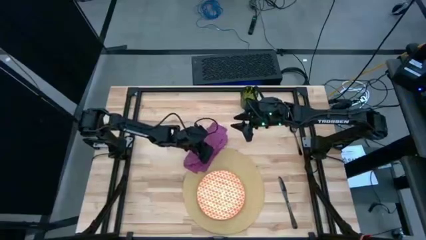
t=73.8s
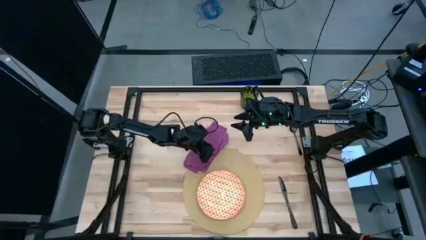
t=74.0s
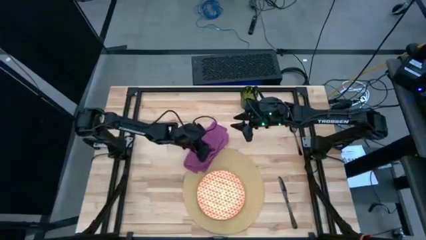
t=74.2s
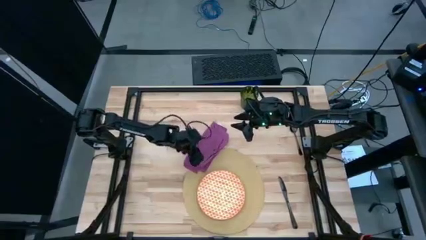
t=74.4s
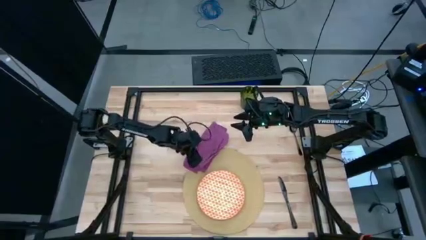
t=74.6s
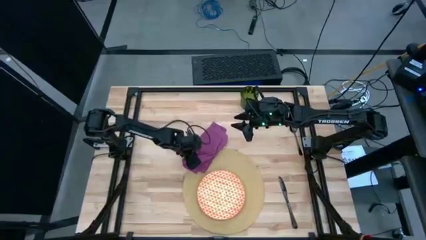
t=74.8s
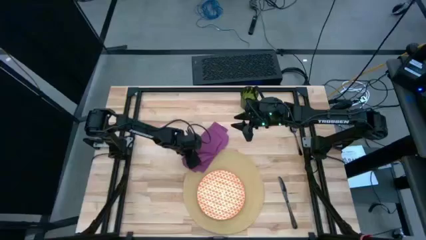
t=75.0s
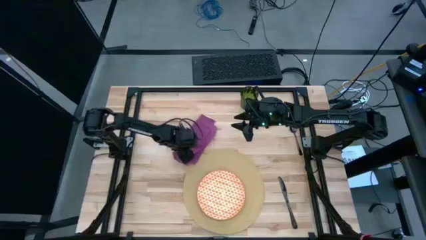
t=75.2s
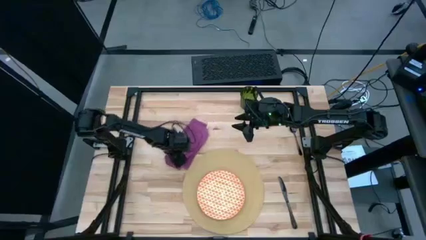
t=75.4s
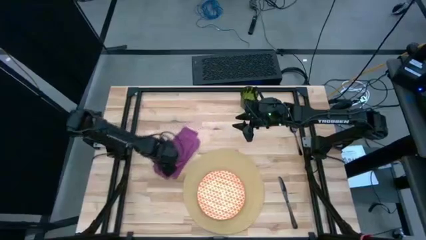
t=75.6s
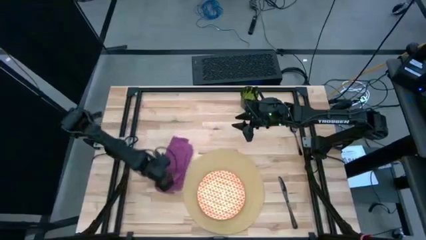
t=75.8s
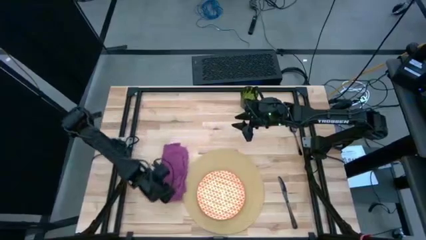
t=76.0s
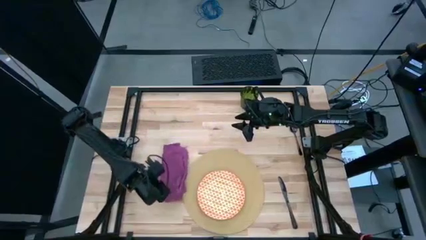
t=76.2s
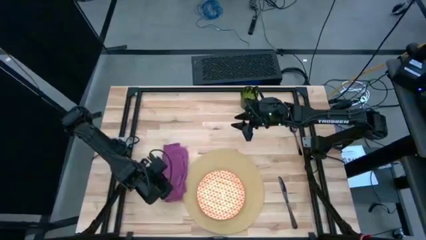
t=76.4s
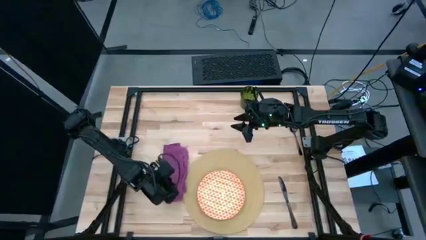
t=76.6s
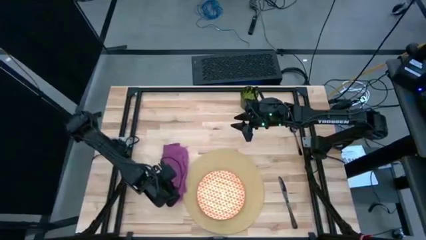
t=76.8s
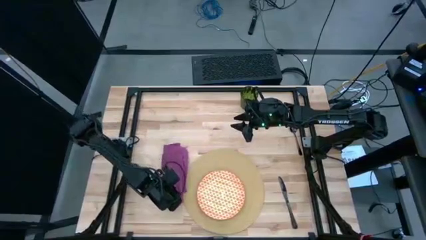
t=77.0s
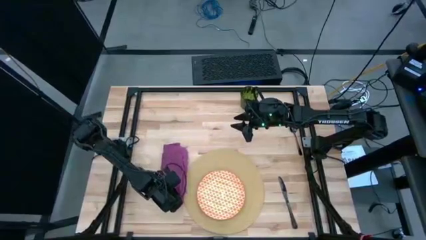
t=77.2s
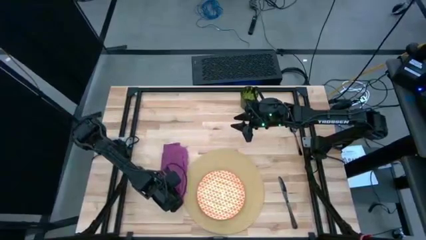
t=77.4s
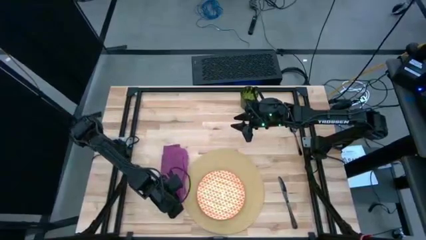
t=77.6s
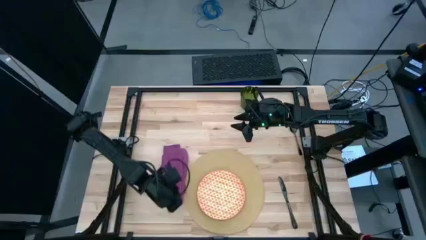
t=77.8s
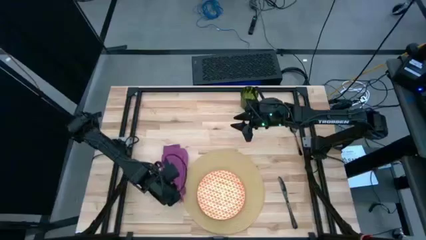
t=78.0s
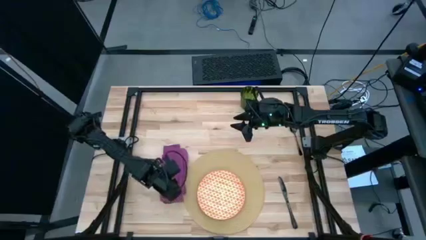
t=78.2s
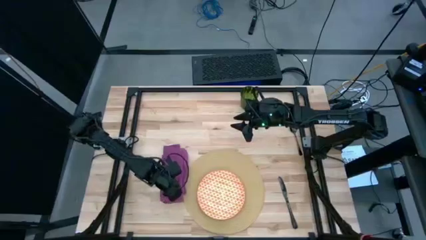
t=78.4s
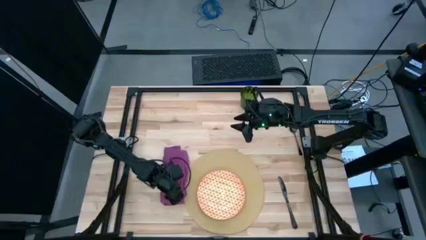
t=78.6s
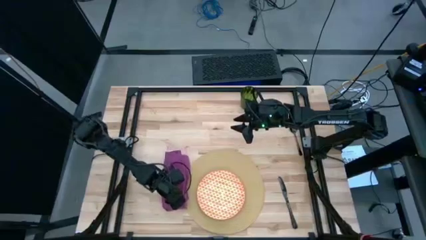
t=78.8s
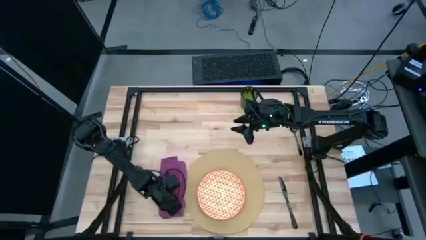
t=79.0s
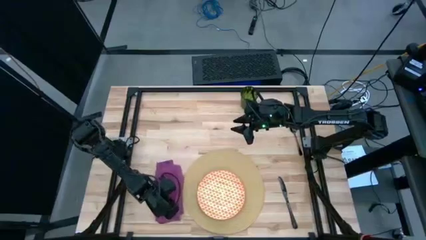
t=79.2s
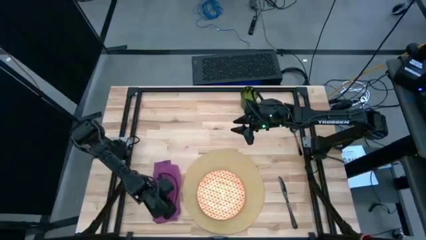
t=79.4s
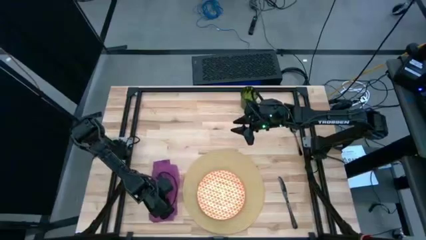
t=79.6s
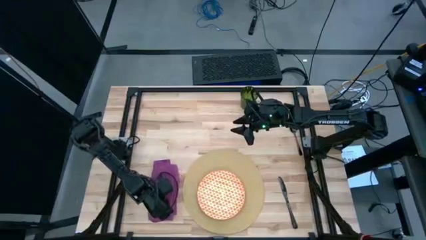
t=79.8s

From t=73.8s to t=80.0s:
Task: Set table place
Move the purple table napkin to the left of the brown table mat

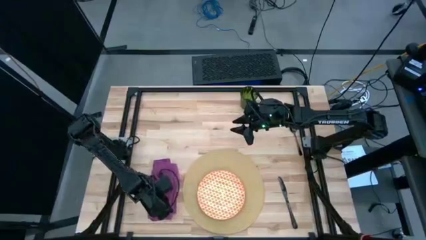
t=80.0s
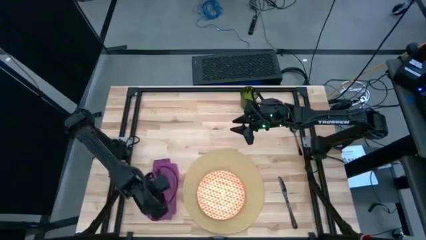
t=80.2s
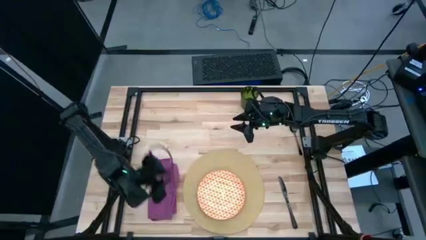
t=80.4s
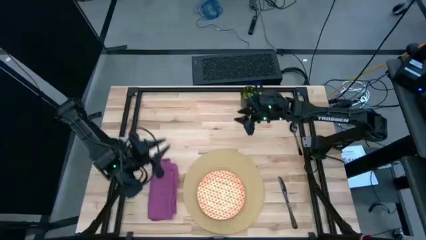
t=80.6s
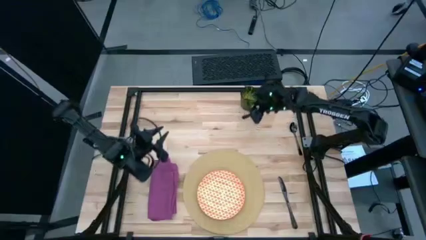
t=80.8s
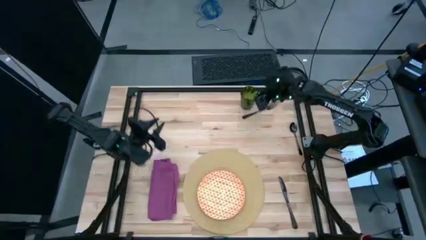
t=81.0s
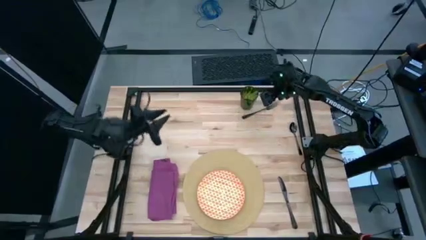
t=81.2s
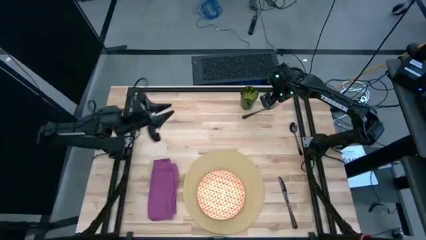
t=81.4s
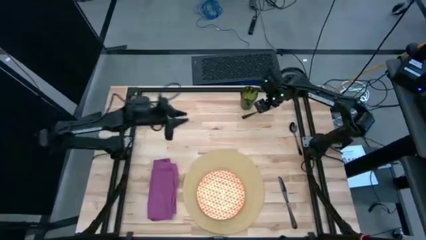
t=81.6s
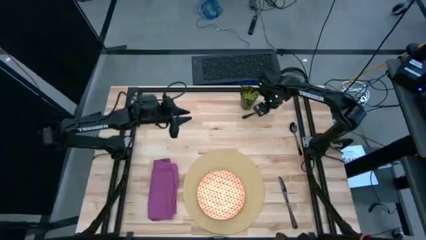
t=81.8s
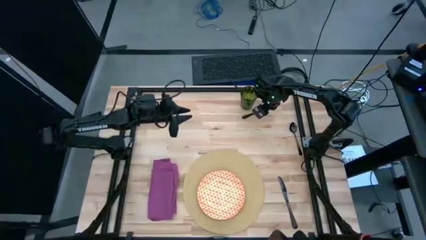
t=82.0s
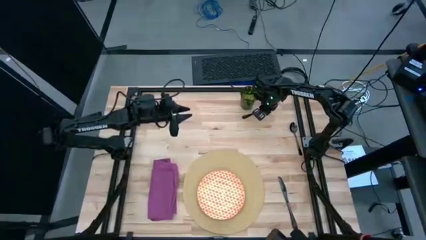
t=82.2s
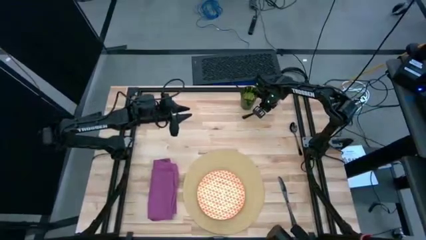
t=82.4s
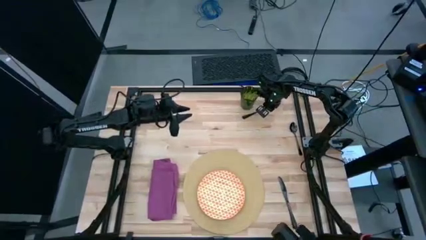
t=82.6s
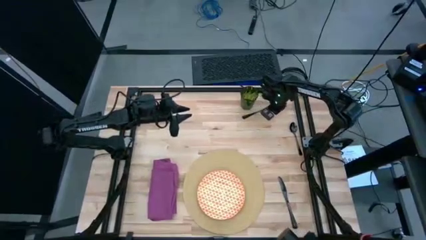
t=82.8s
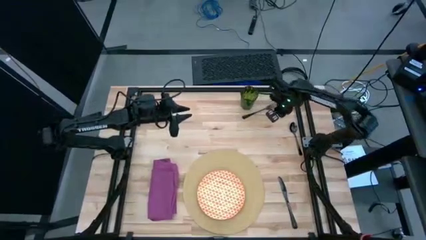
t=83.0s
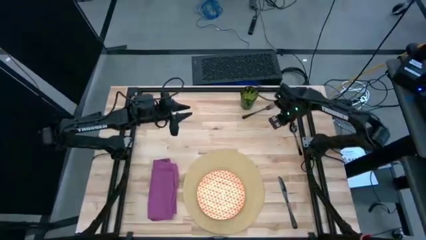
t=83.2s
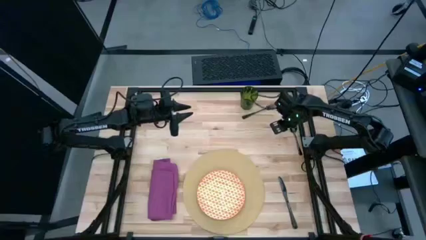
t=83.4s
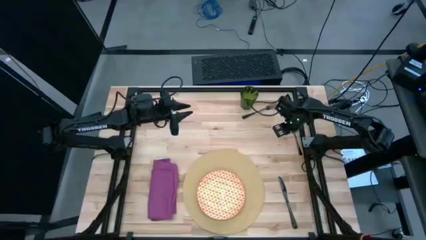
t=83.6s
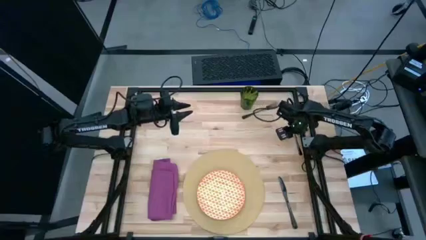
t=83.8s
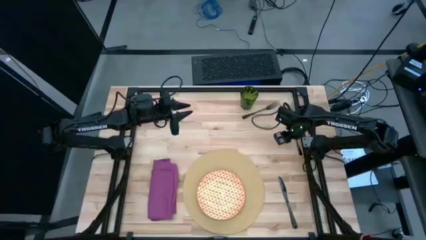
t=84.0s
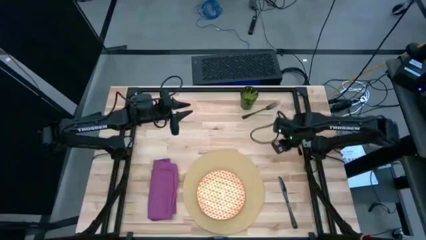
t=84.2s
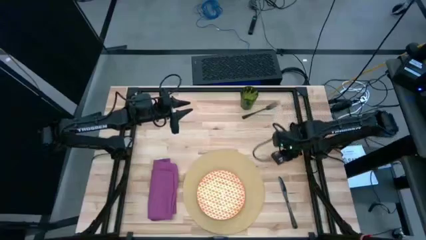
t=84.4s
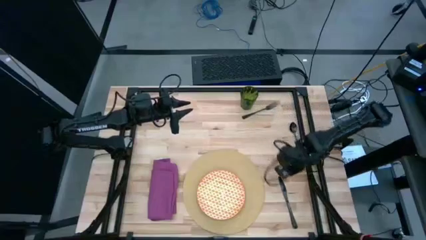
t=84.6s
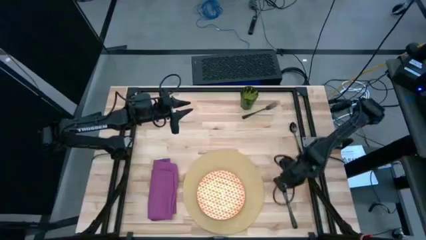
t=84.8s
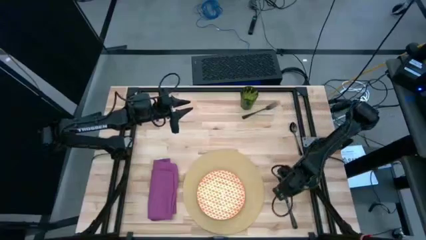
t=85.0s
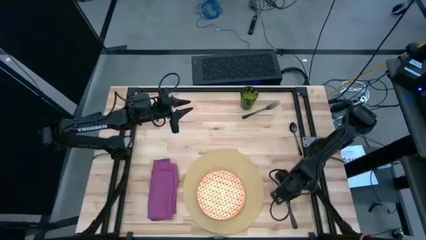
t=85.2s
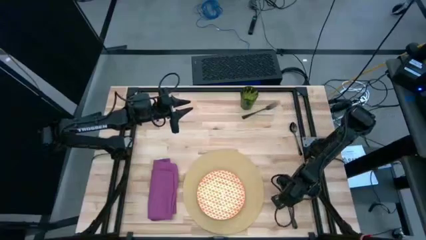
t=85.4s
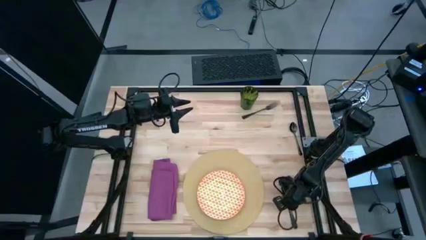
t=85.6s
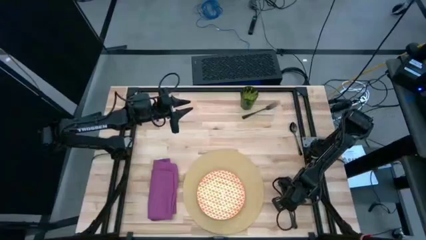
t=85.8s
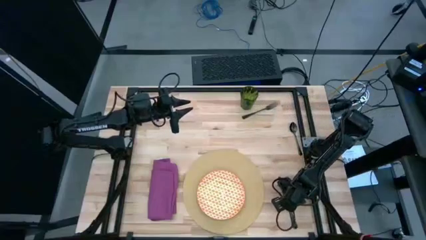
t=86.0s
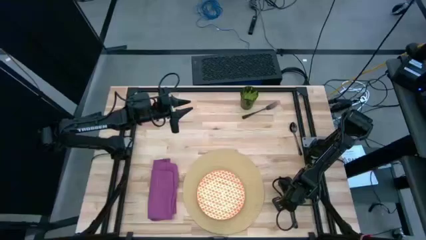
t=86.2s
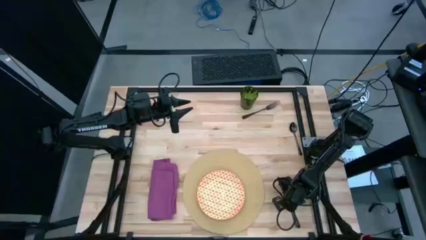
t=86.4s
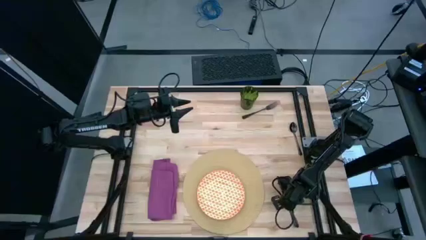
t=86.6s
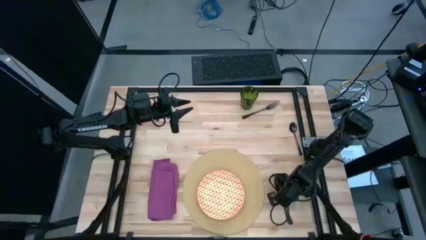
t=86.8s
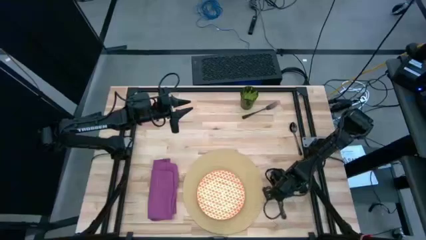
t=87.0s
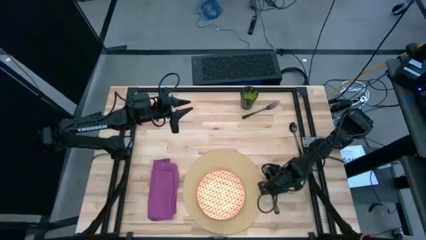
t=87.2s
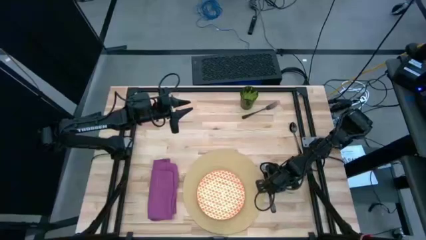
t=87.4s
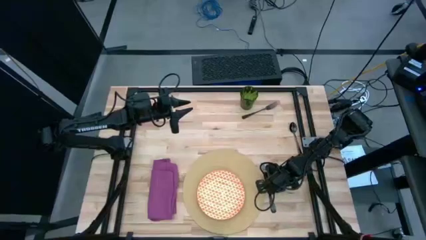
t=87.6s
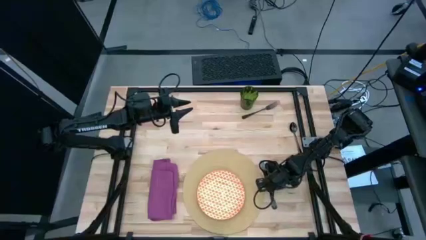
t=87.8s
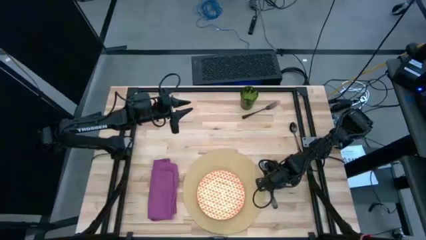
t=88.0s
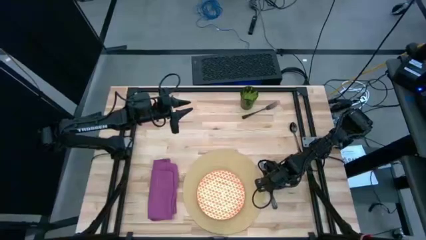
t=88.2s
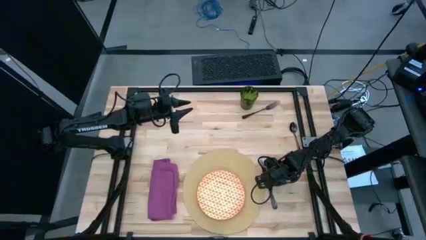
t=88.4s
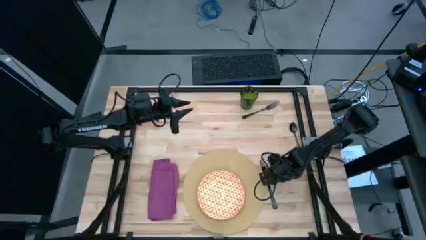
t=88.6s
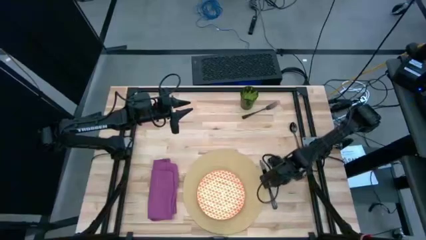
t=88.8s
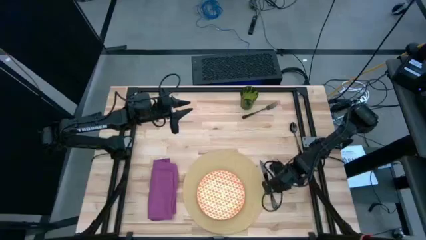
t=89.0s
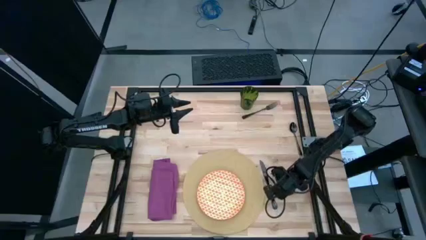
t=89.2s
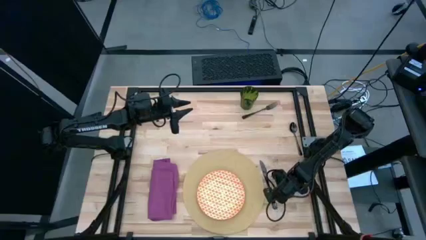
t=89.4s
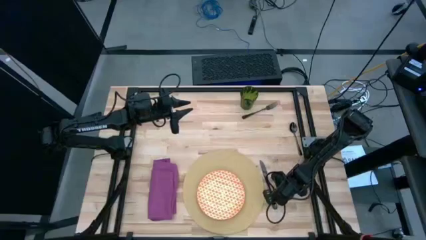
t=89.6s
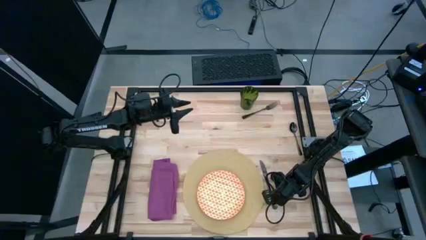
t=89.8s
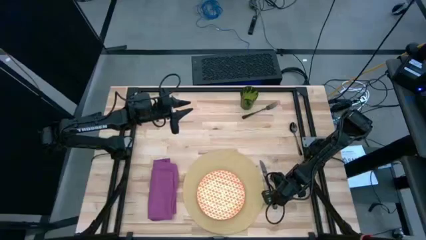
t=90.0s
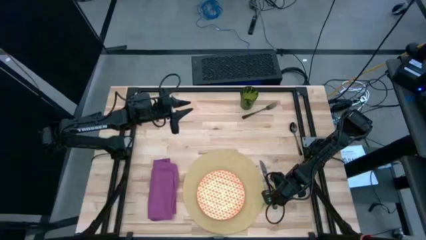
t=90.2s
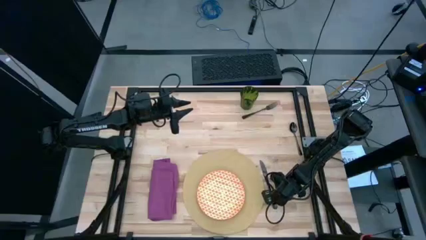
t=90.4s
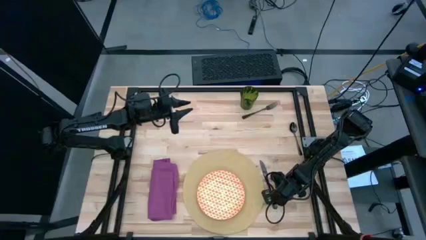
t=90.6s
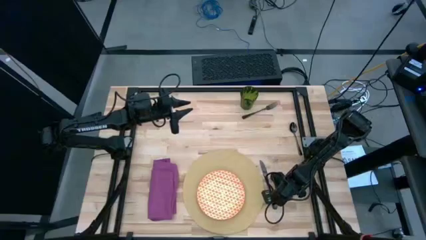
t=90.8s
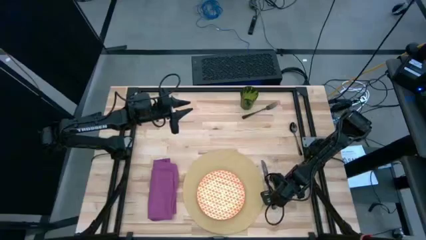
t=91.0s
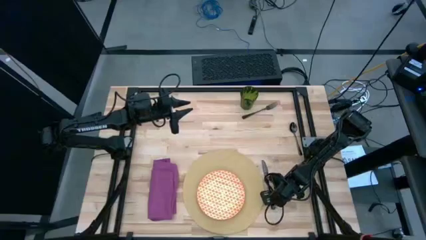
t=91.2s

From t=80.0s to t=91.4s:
Move the black table knife to the right of the brown table mat
